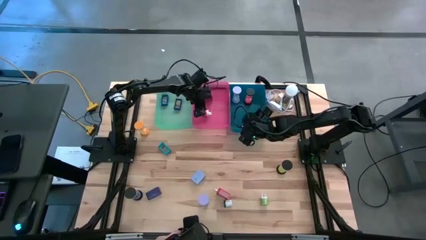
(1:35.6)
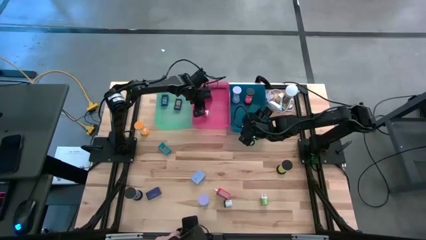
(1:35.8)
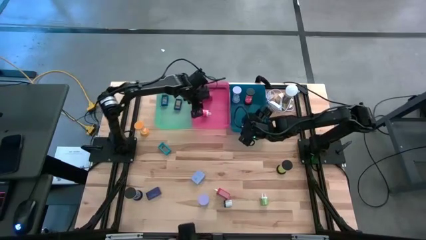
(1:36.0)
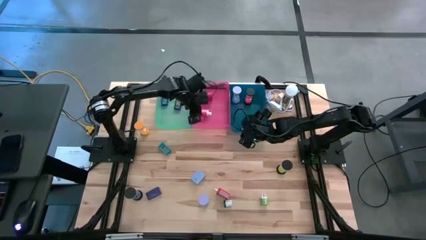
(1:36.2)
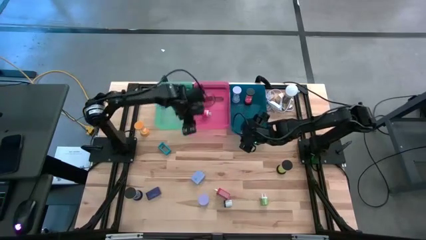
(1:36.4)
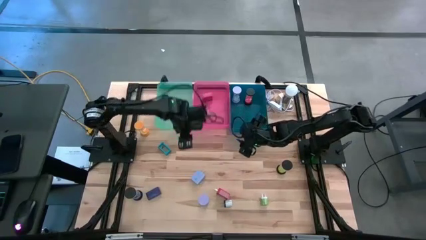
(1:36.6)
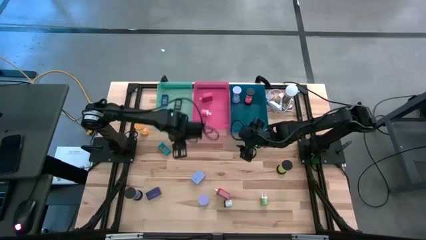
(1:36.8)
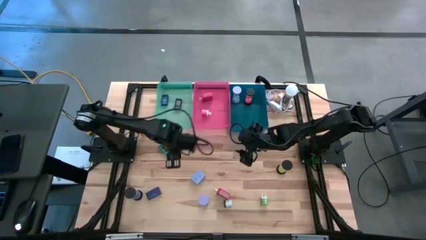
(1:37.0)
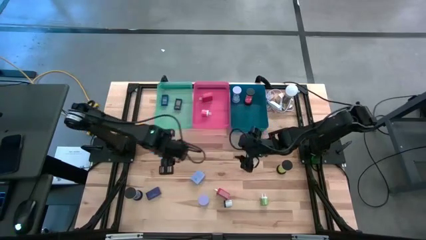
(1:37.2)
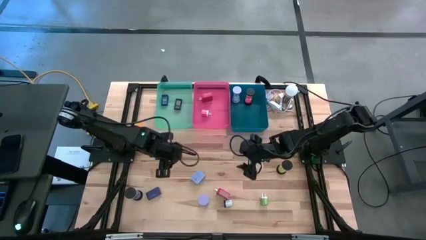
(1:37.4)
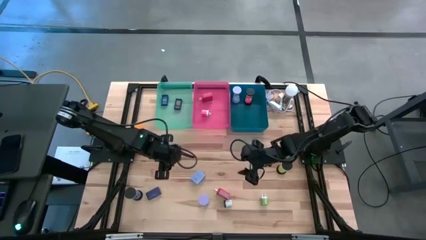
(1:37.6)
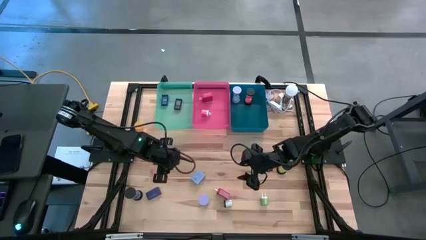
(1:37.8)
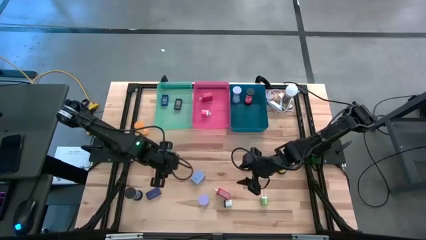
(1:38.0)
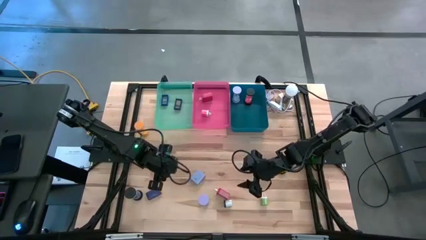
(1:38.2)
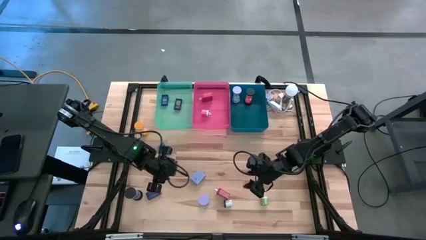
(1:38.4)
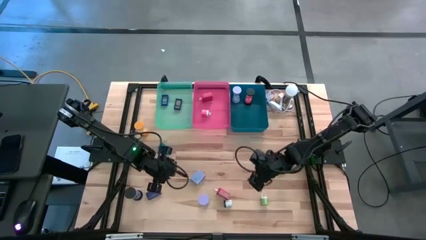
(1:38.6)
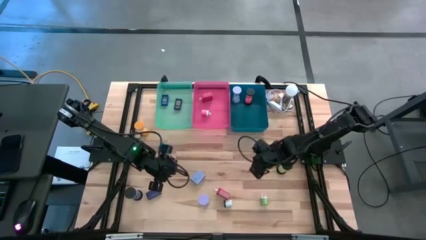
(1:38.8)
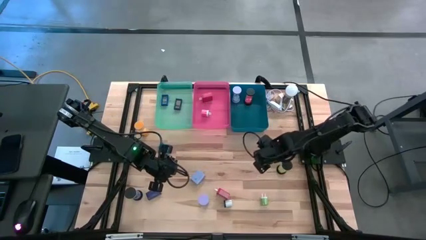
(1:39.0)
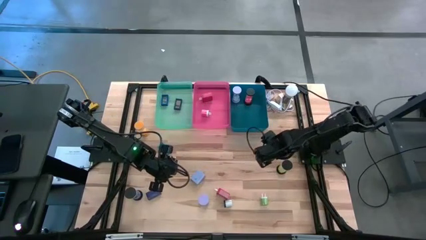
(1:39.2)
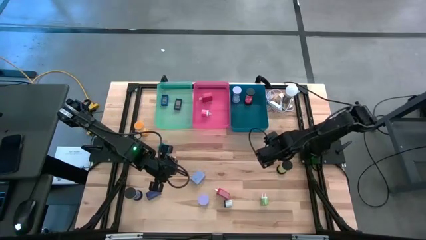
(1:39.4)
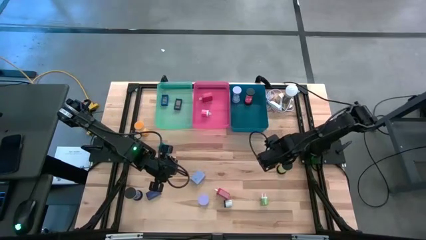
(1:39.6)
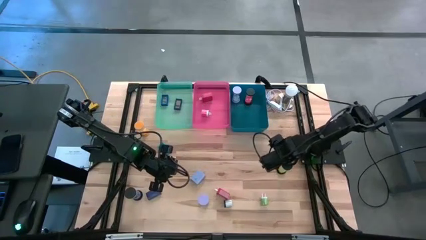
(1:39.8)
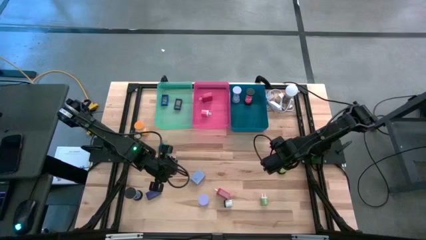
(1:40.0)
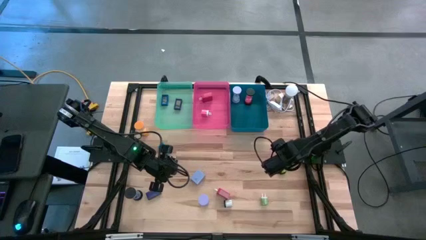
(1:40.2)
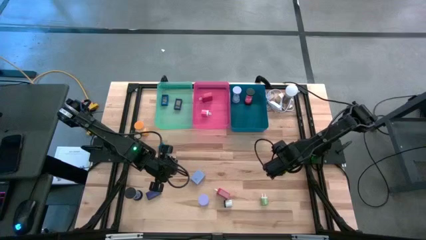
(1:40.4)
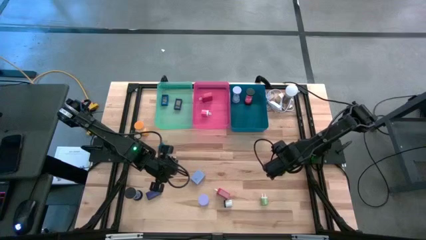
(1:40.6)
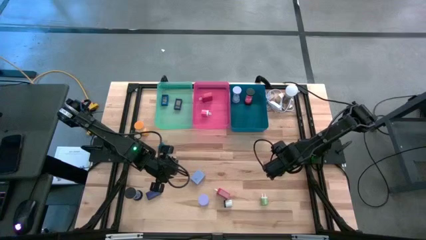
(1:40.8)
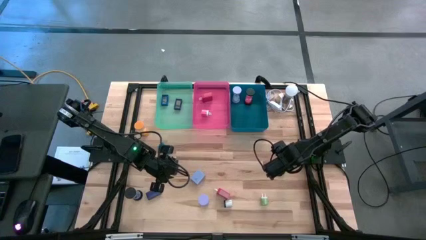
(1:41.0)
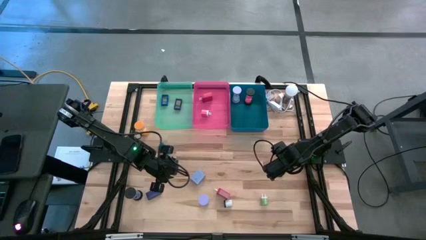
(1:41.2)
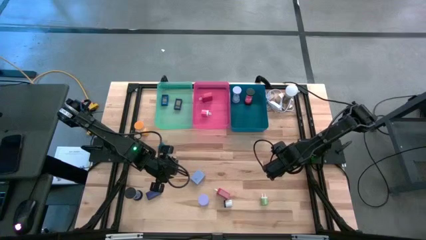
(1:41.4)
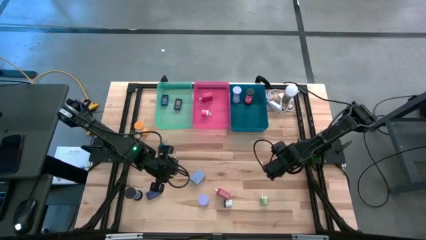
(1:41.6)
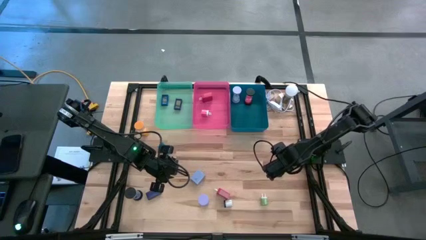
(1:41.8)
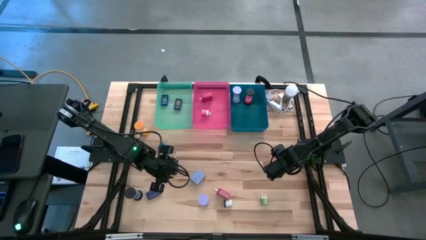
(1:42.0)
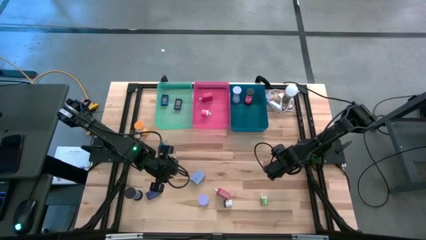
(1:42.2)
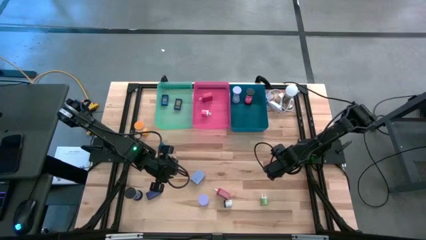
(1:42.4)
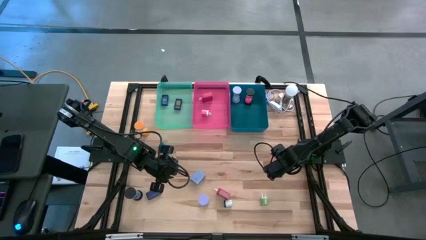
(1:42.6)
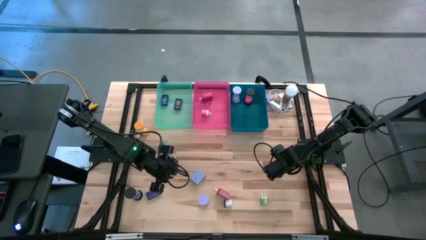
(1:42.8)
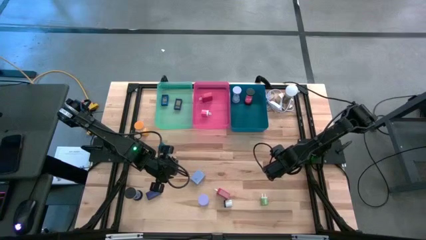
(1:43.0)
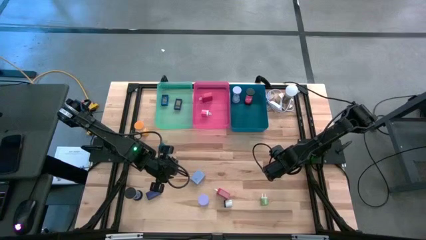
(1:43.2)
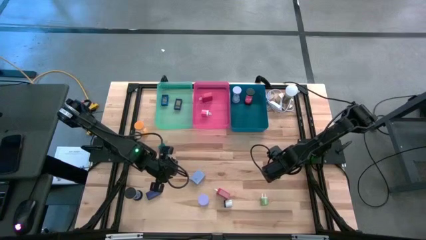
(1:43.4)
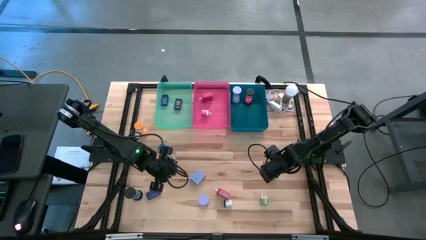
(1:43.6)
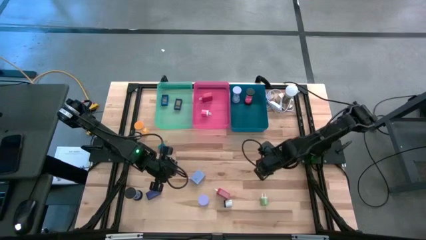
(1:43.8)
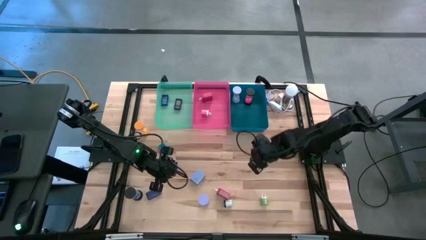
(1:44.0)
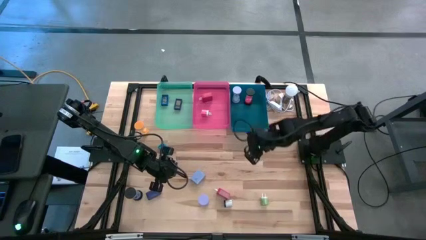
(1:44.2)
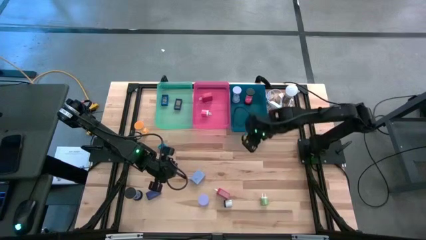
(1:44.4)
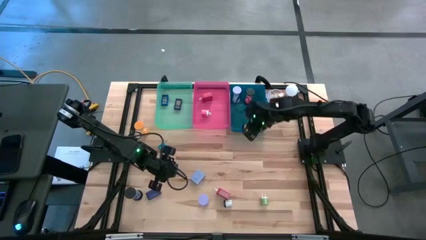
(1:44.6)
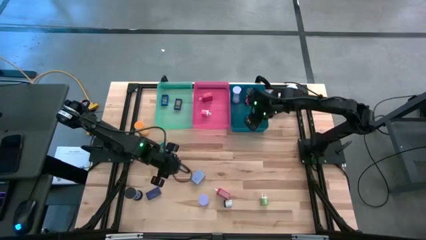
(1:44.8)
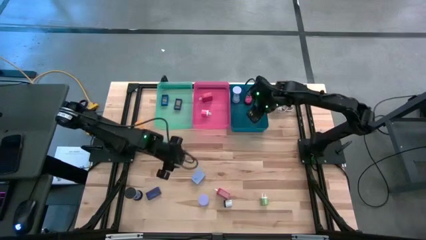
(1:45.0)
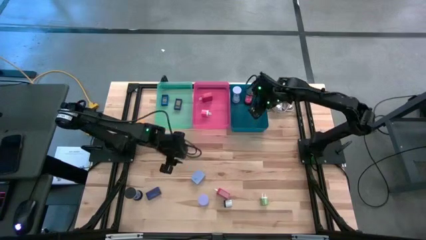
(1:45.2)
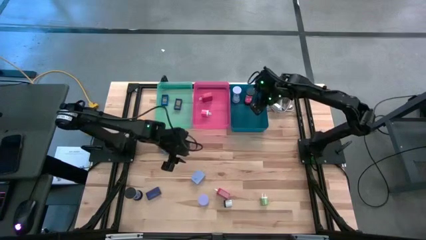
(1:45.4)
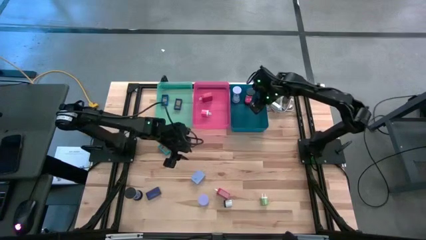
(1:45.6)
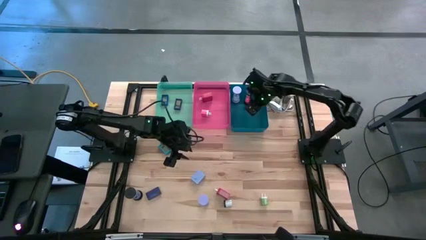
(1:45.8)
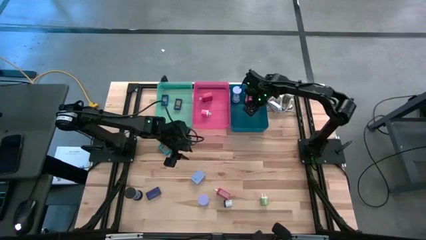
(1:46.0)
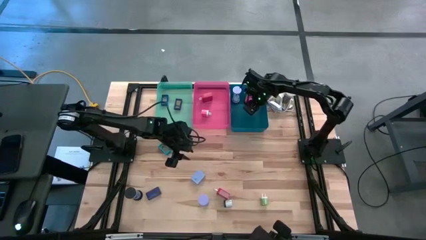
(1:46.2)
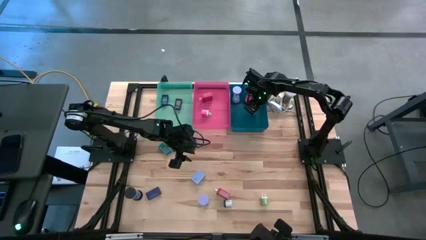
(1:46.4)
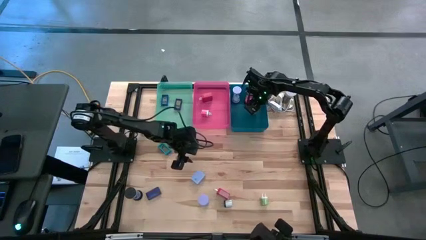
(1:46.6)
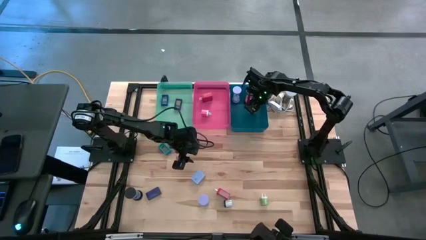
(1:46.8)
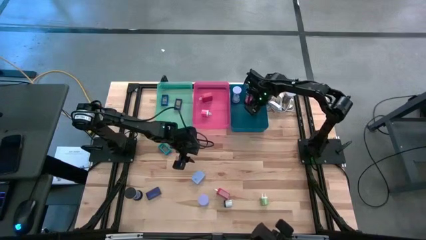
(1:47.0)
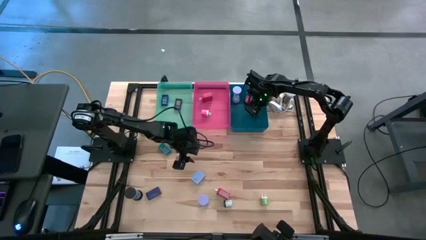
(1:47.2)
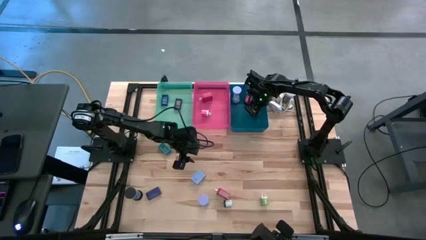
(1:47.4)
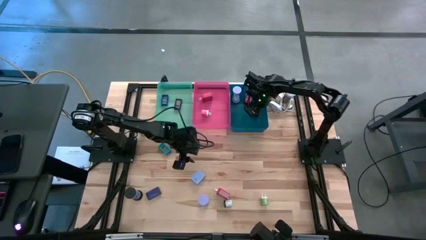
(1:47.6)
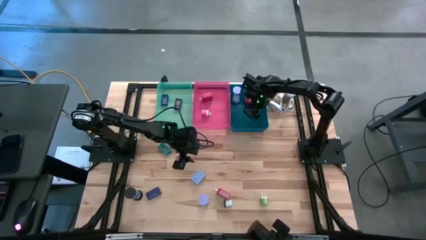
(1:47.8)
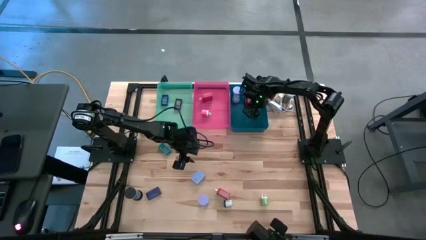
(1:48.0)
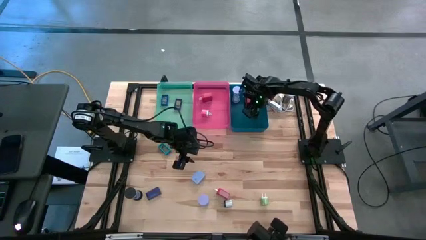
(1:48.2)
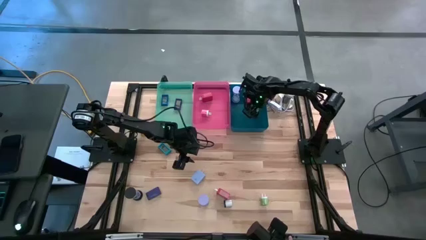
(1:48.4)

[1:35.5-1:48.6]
Task: Pick & Place Office items
Put the yellow hourglass into the dark blue bin

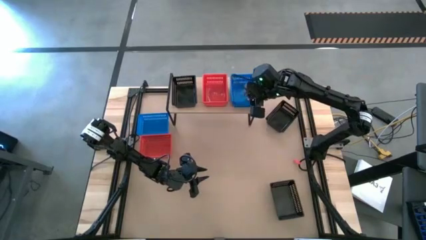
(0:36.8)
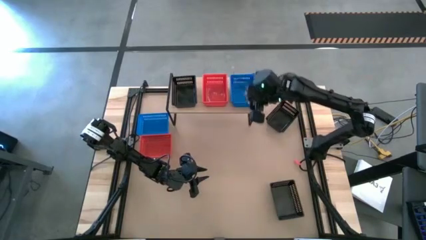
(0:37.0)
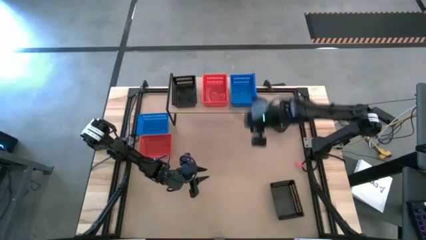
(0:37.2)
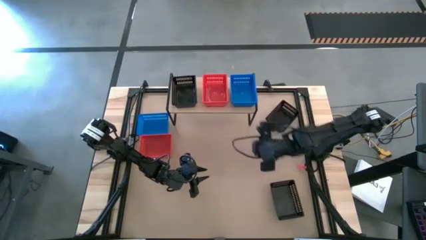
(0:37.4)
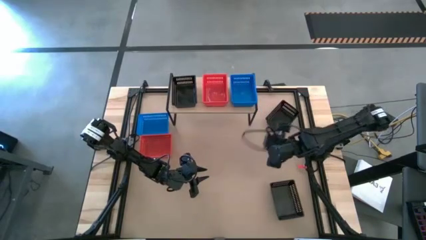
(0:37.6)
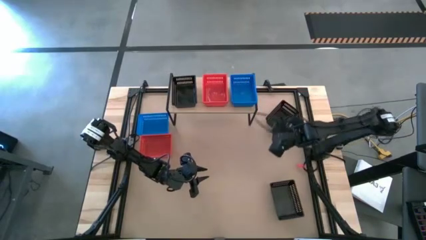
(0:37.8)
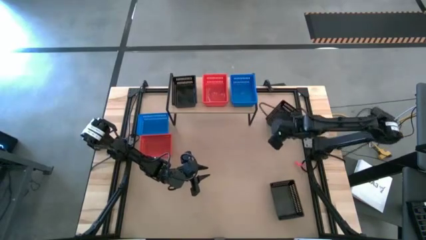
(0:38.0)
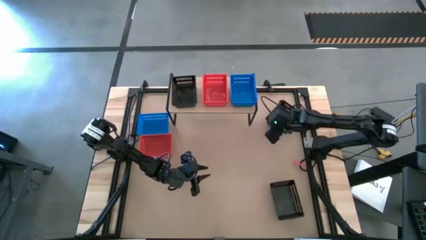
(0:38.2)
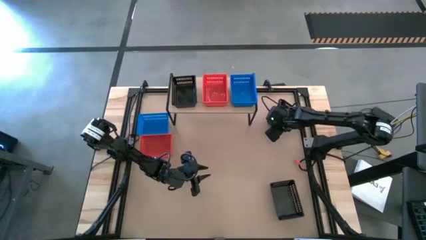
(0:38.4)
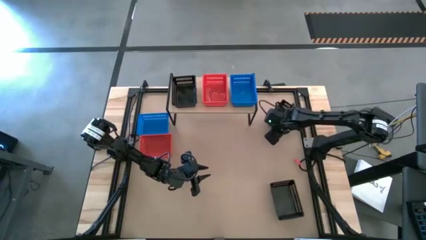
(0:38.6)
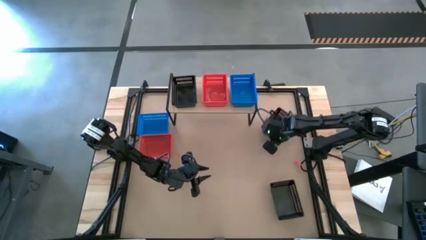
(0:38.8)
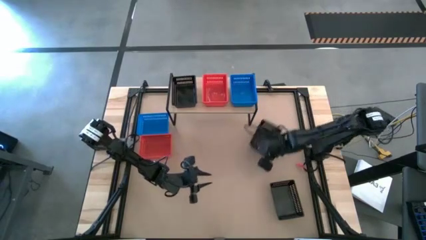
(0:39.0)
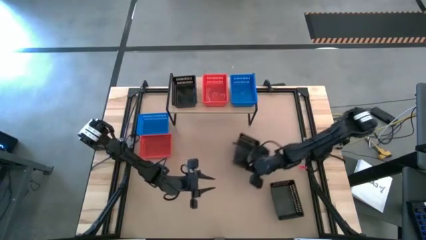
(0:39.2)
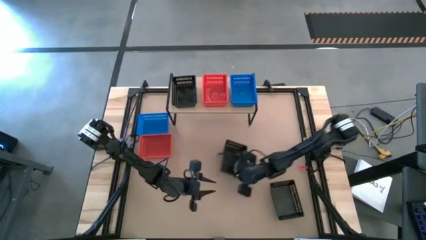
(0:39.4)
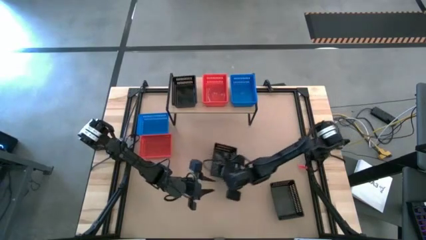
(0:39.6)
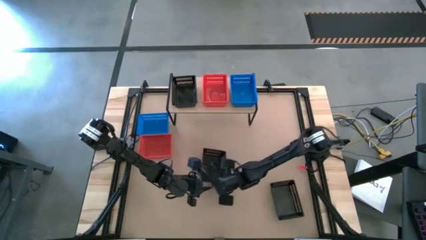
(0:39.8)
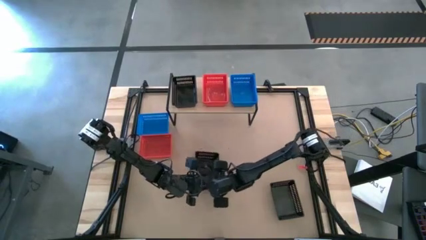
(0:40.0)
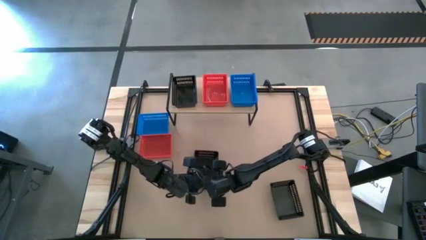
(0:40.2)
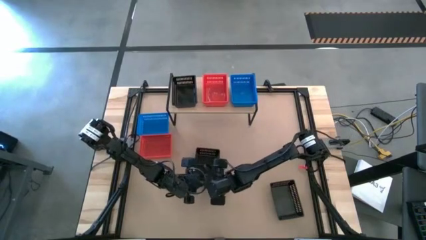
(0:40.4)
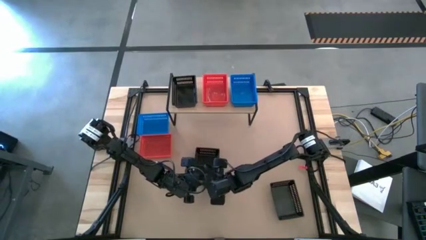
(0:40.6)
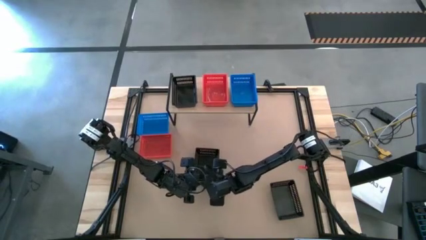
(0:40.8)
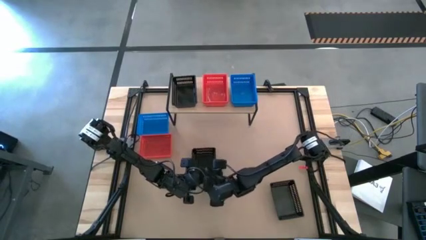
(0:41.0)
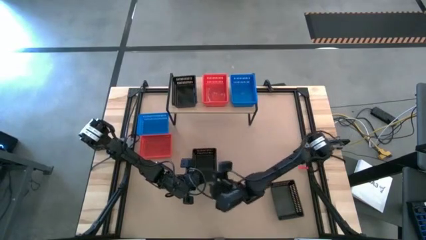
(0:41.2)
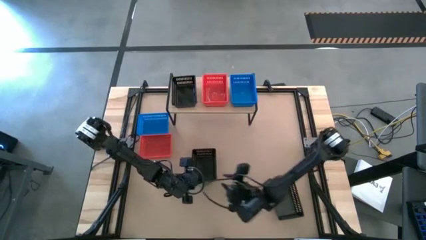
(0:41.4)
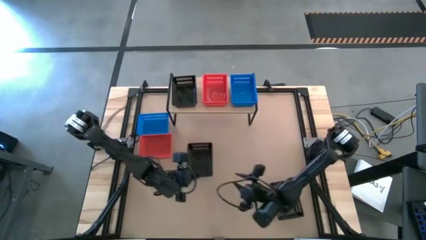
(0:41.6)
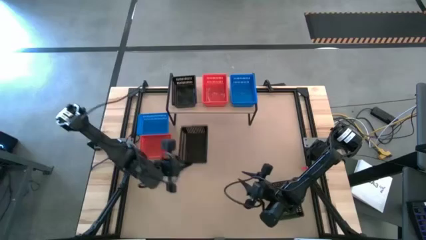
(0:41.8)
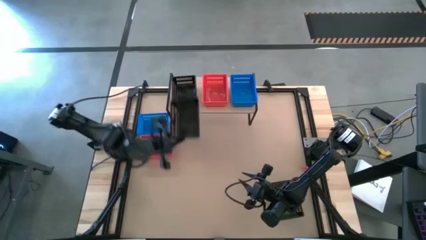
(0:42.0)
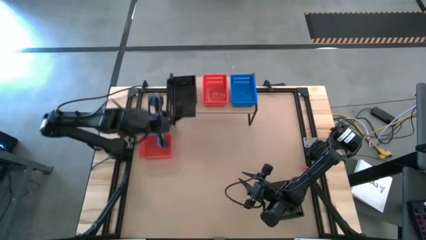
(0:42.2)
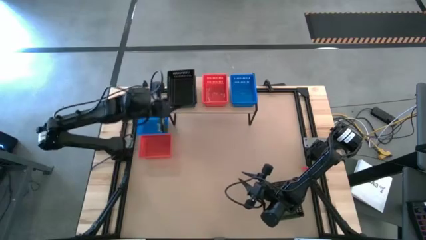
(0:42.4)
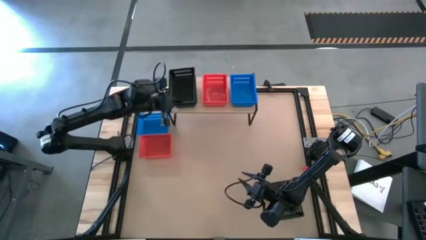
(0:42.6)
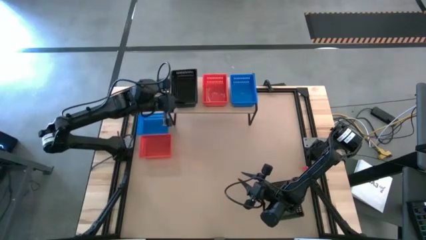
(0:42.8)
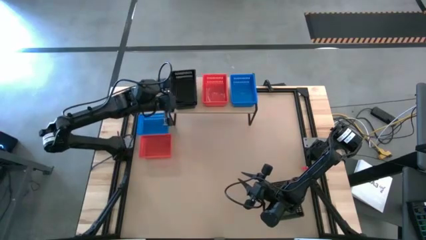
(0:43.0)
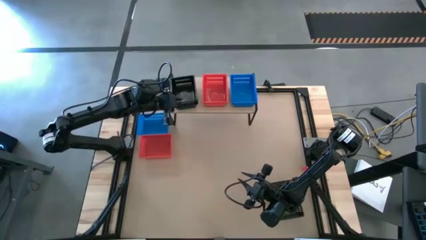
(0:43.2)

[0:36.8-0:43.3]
Task: Stack baskets on shelf by color
Stack the top black bin on the black bin on the shelf
